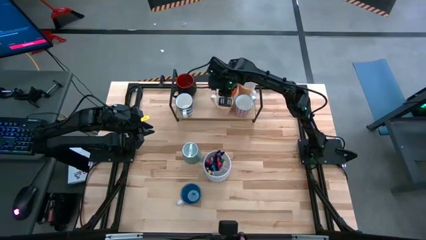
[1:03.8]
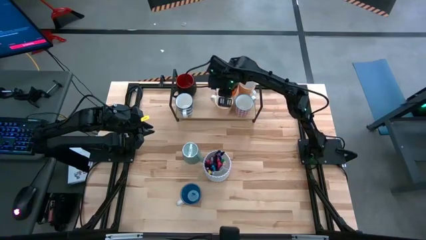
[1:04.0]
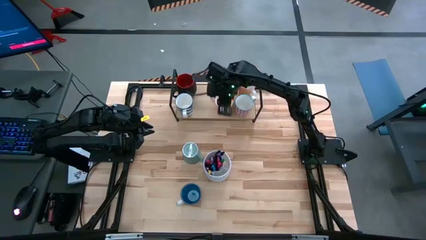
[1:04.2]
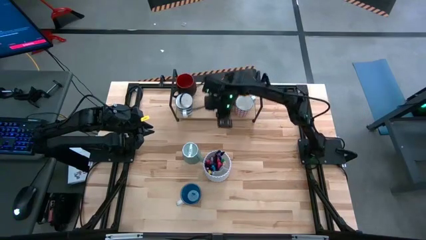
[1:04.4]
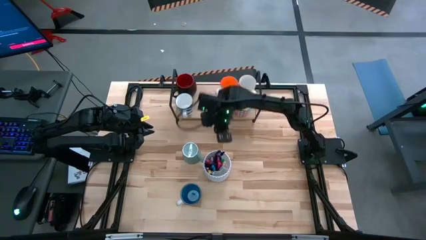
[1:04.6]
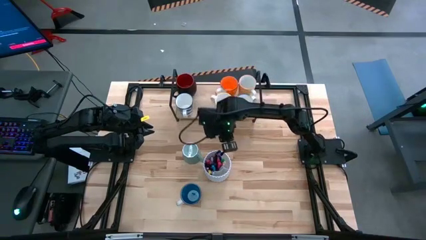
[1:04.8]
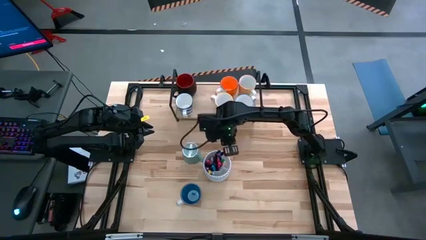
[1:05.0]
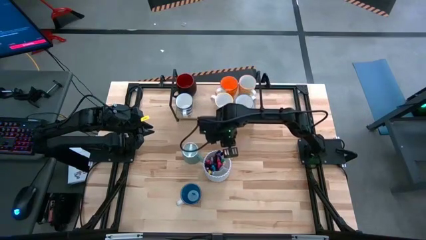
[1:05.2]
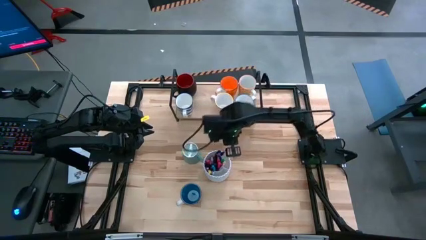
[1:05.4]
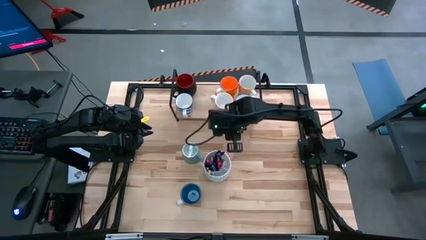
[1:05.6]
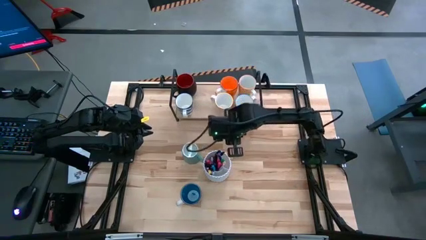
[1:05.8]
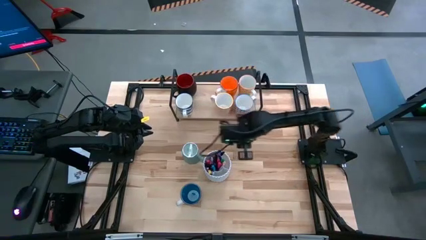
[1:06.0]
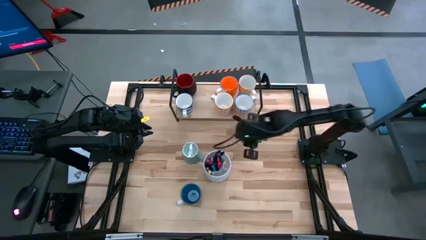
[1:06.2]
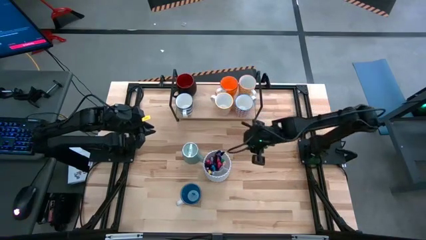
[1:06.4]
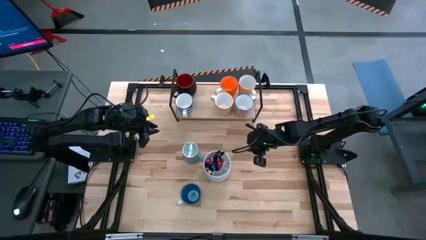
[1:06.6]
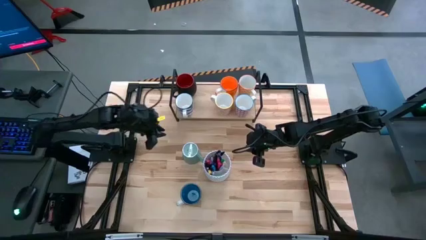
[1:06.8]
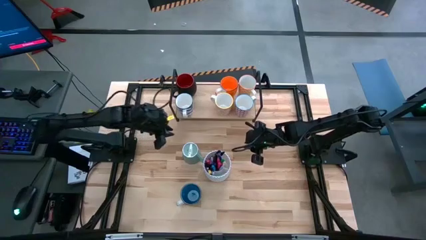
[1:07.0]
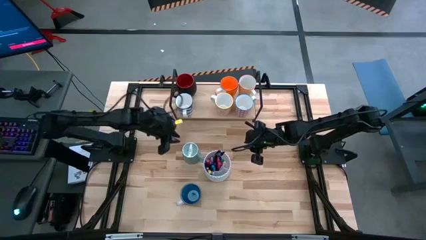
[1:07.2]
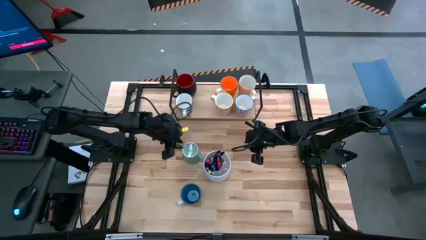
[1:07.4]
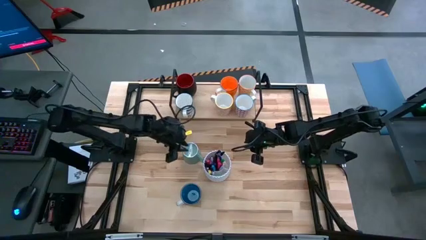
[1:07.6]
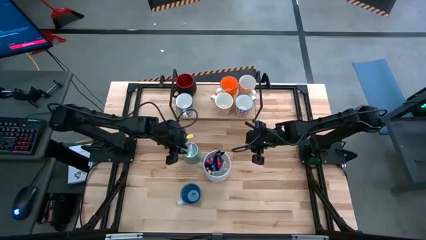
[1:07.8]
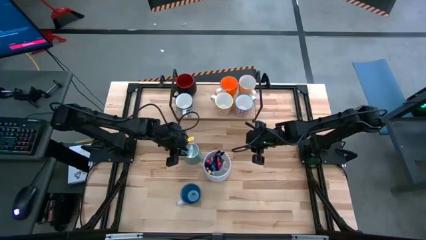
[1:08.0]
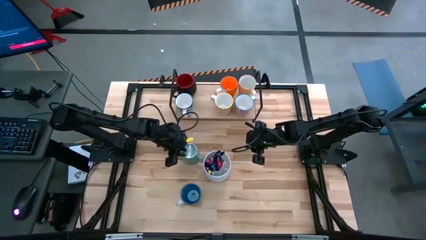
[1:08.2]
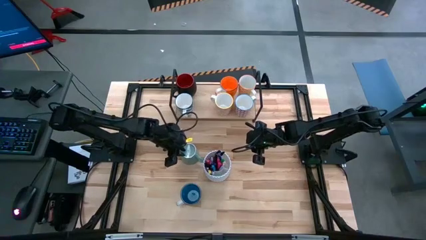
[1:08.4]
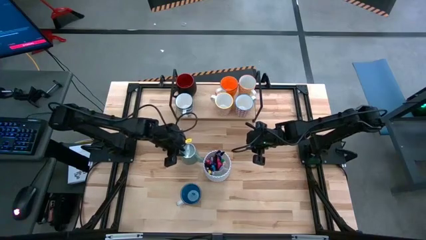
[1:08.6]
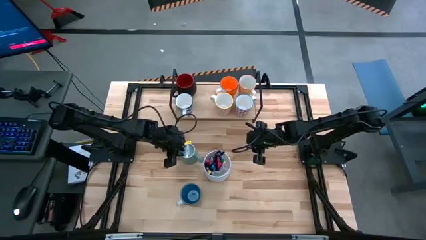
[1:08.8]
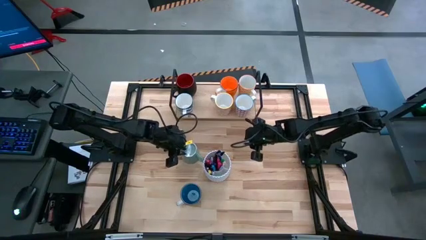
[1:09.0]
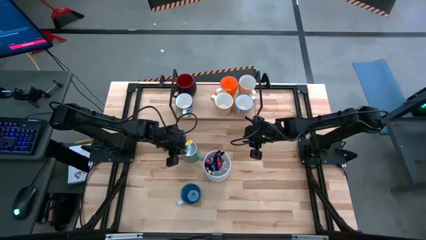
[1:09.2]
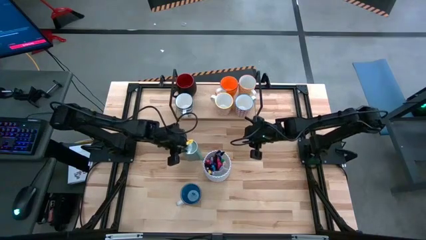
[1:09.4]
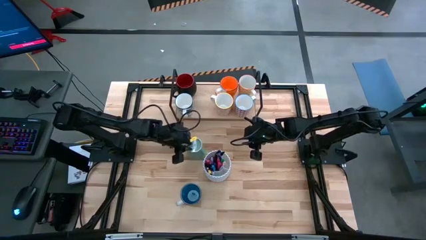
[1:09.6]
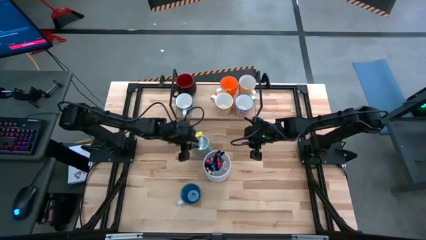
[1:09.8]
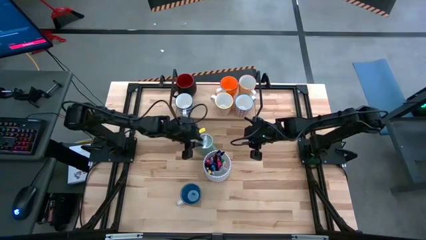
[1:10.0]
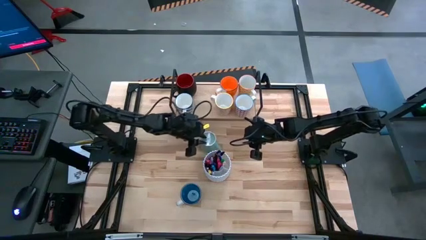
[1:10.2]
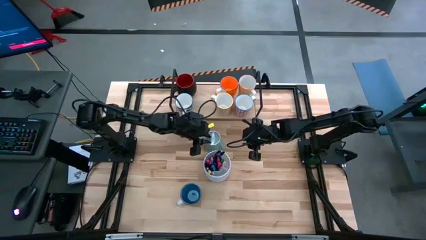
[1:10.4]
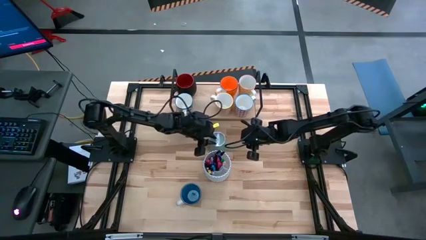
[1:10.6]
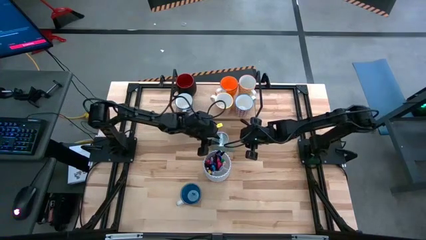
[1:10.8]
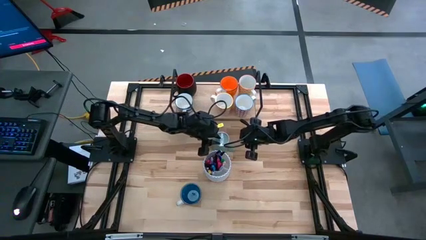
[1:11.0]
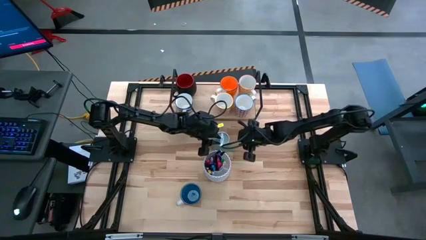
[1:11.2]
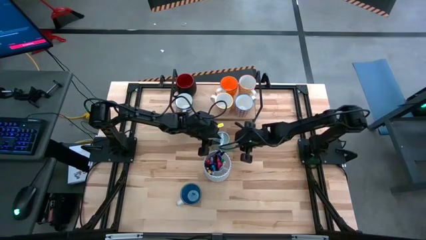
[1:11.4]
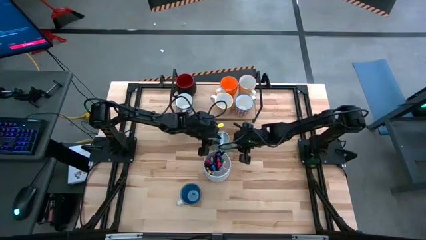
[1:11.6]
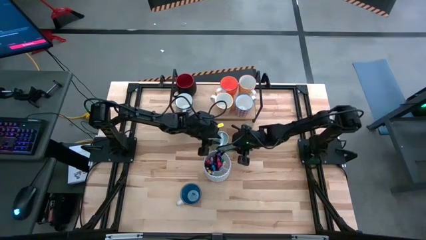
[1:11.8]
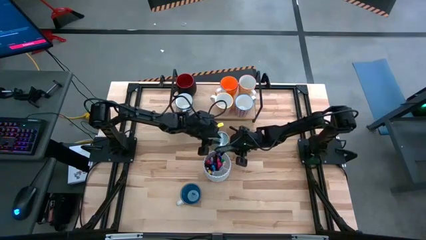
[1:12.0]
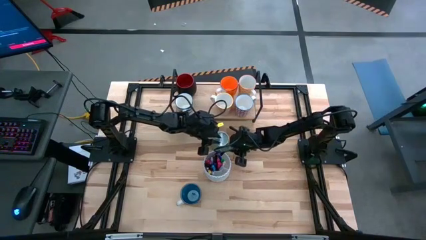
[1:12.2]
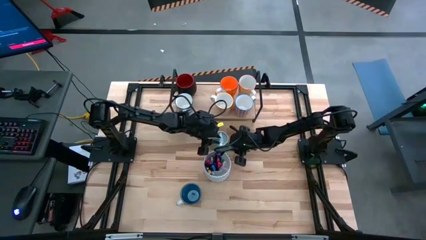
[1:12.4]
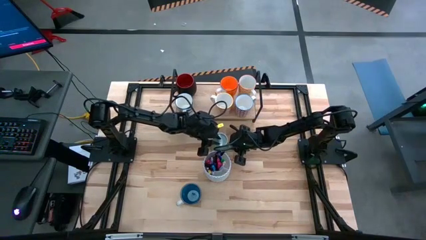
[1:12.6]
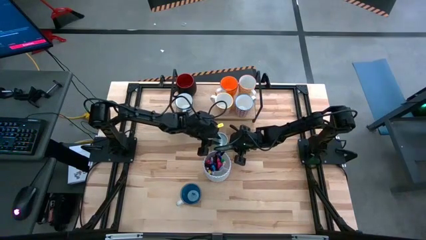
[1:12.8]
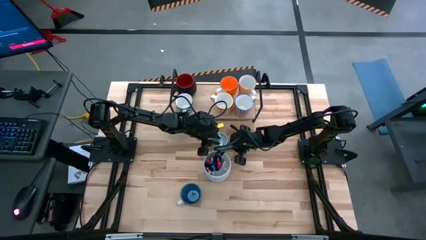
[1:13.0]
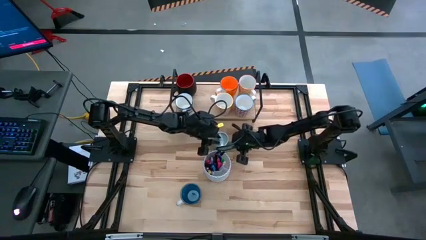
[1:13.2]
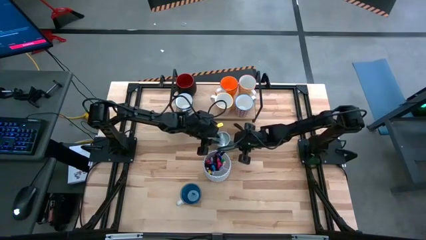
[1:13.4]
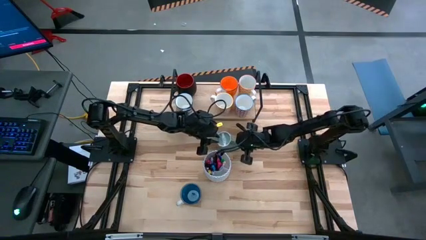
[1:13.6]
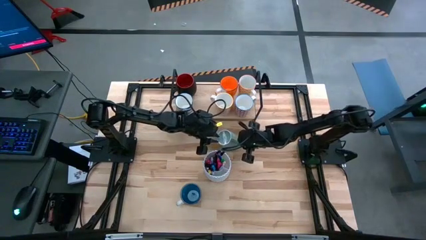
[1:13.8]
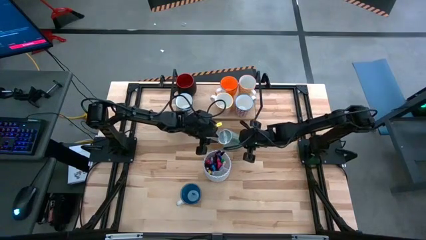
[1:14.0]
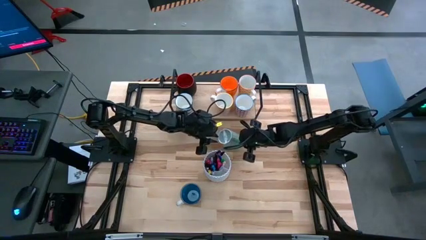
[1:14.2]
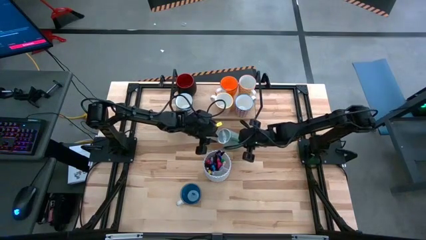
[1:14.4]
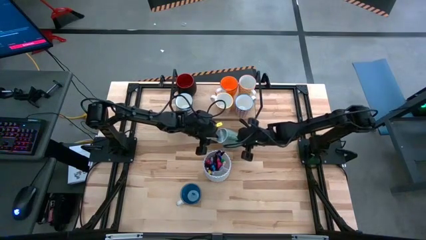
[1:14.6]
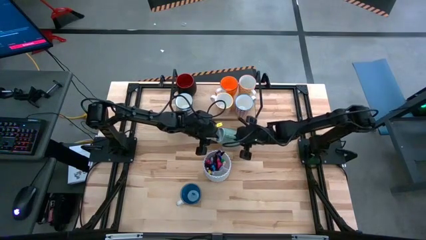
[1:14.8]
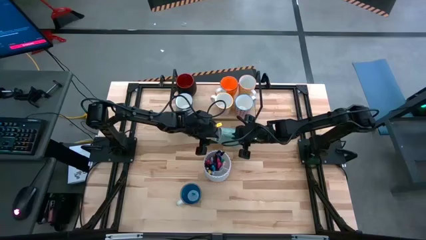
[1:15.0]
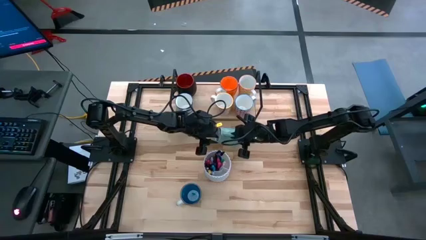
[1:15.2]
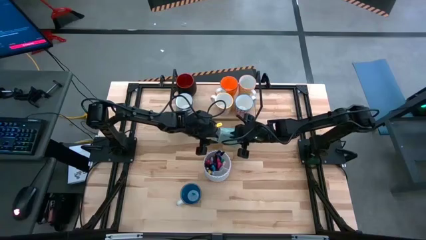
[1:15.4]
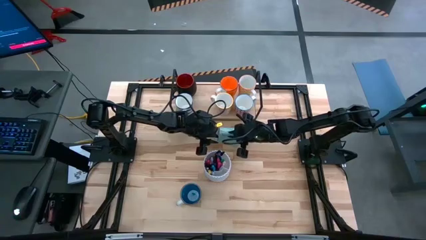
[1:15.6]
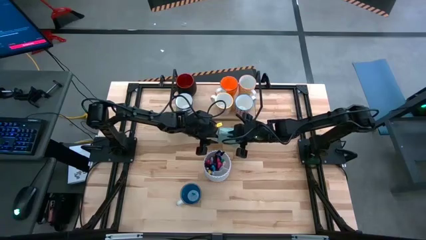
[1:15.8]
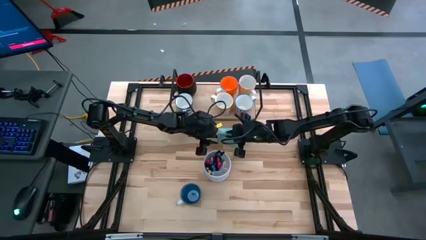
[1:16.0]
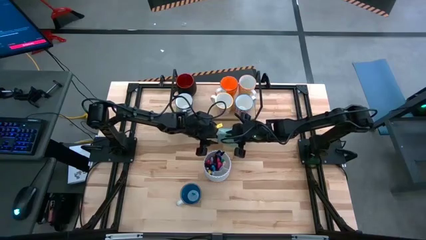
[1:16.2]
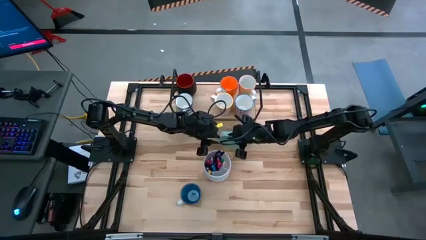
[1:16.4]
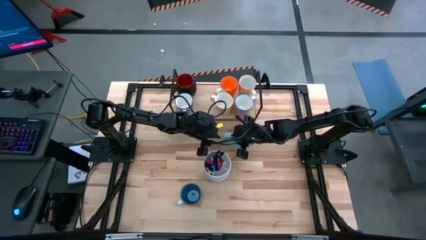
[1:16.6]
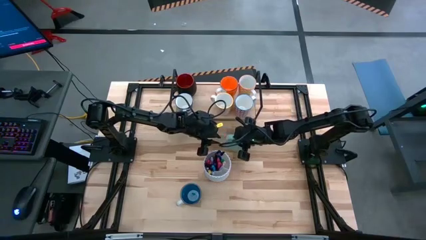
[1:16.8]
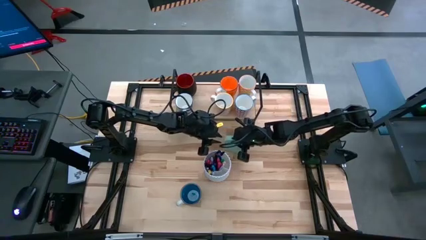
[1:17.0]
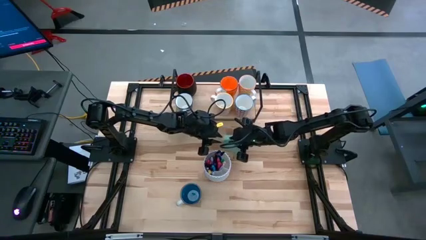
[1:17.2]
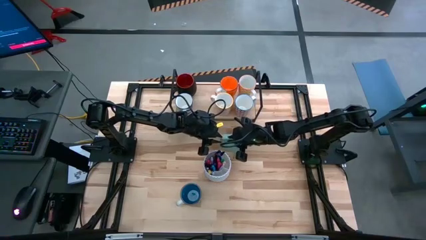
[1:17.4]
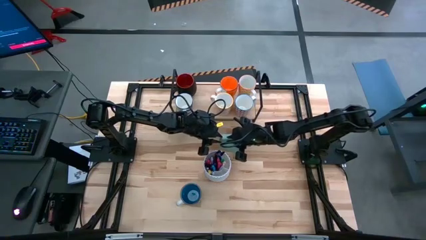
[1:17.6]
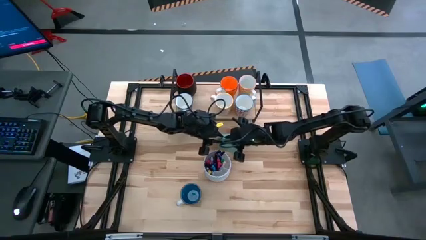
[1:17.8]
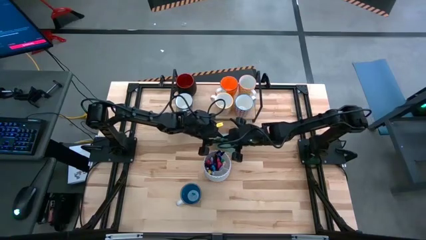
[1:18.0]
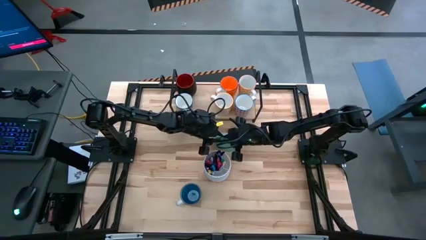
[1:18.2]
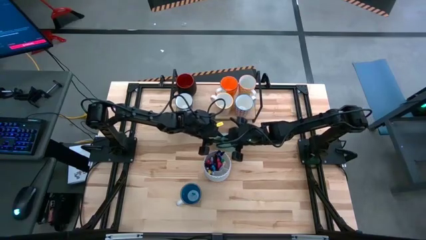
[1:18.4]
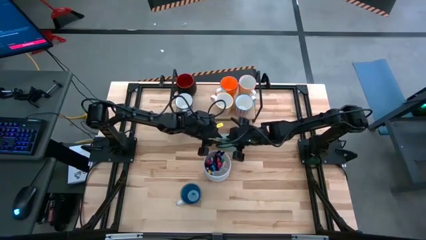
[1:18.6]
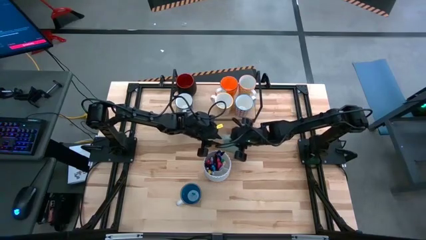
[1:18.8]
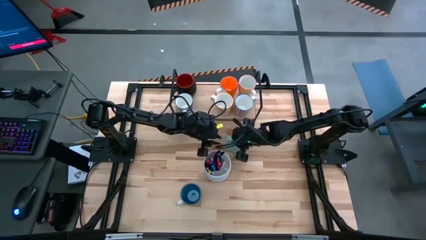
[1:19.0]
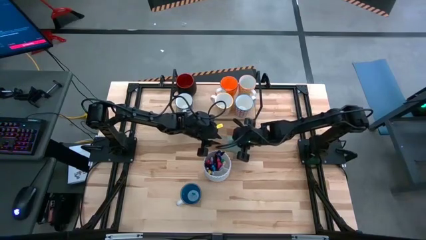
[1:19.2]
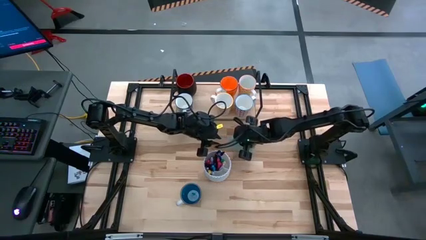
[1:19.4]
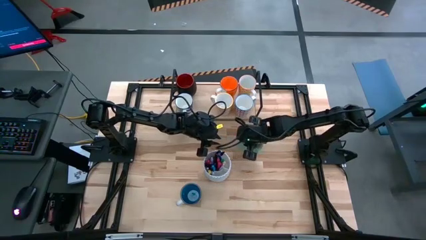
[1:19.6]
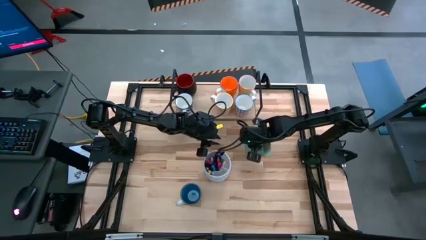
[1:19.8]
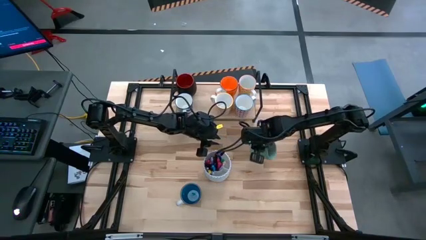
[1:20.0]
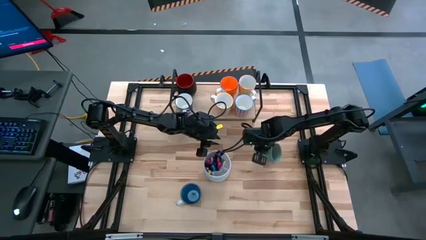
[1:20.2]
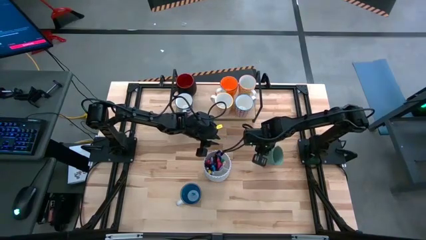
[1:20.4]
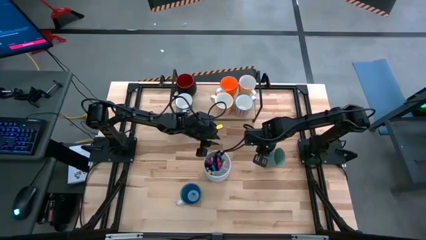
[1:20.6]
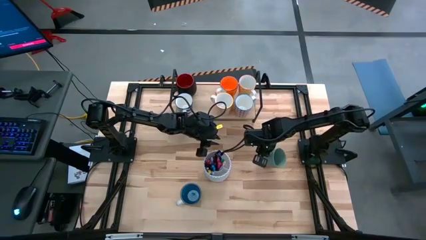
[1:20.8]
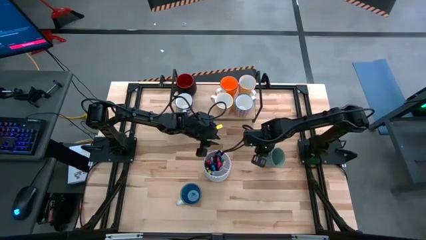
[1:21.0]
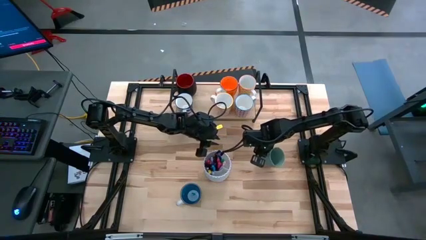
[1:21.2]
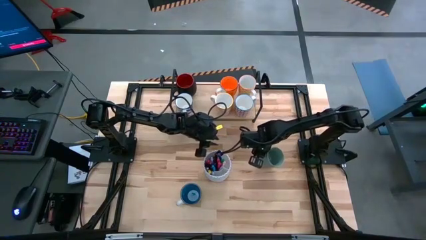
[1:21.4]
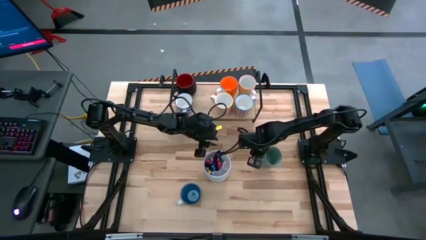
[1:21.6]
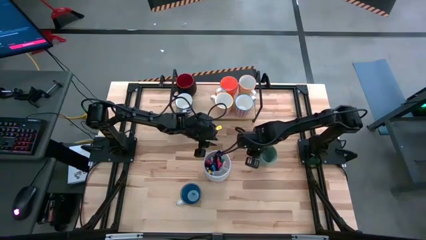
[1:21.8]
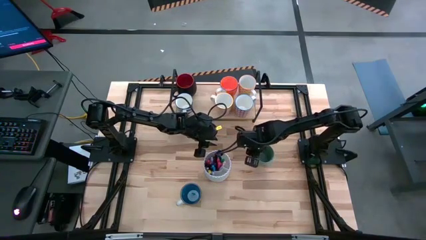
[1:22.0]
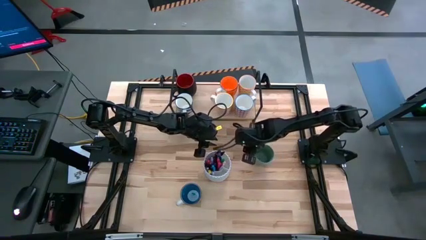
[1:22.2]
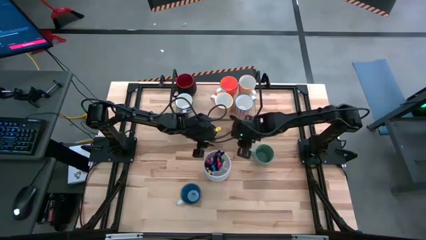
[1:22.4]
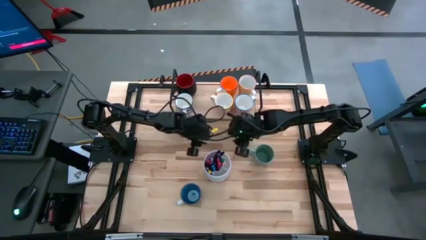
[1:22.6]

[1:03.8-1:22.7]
Task: Place coffee mugs
Prepare the green mug
